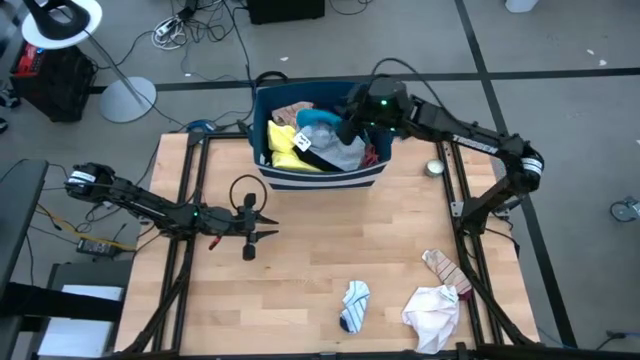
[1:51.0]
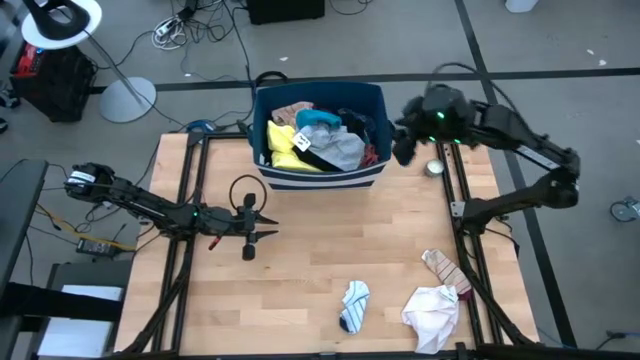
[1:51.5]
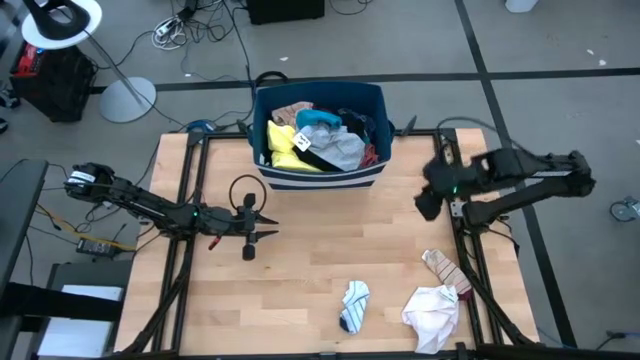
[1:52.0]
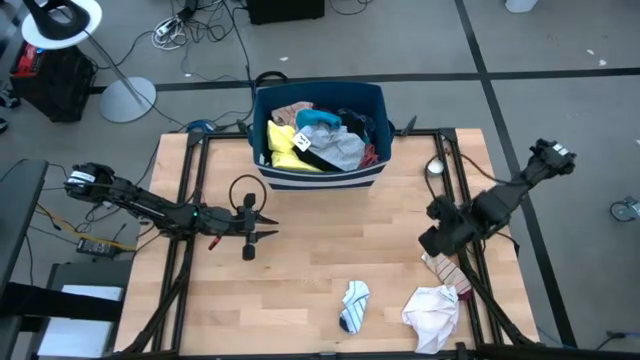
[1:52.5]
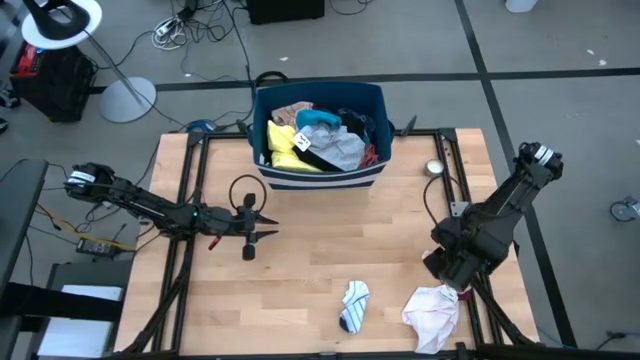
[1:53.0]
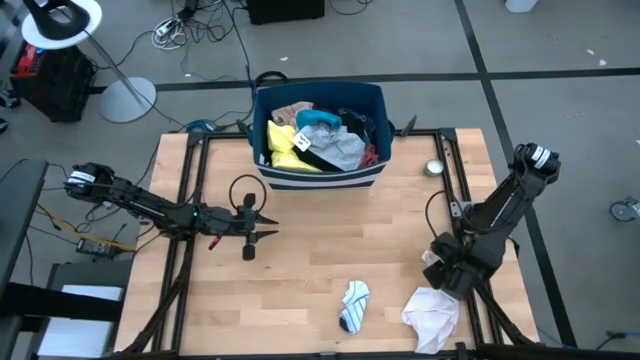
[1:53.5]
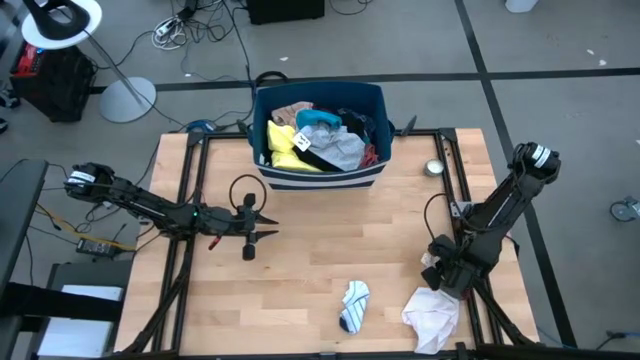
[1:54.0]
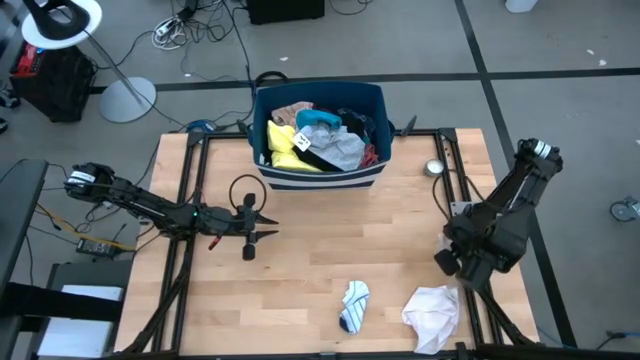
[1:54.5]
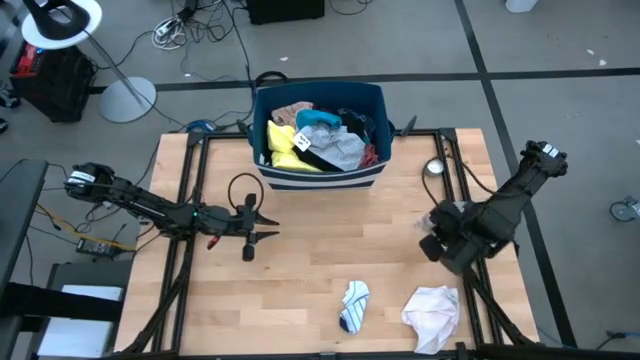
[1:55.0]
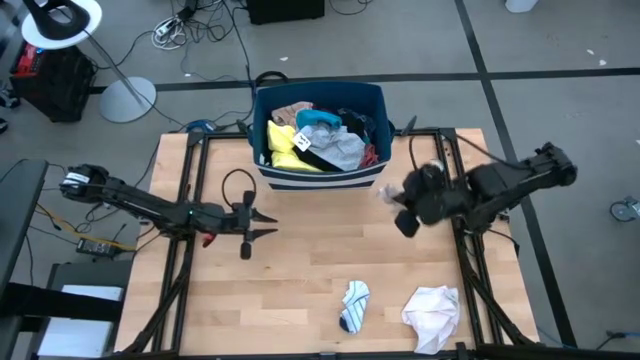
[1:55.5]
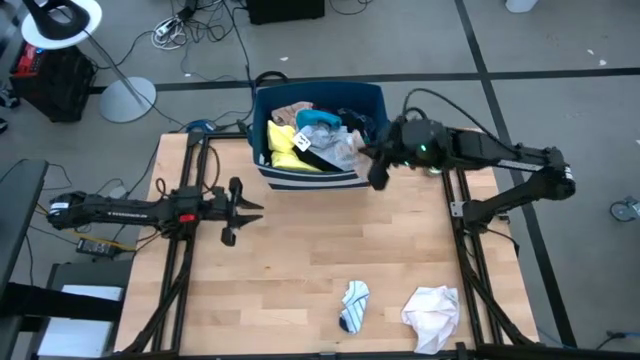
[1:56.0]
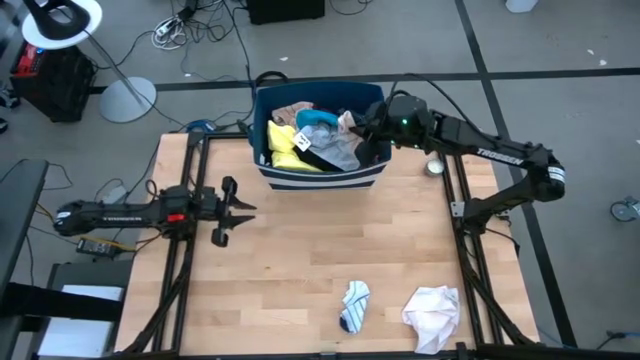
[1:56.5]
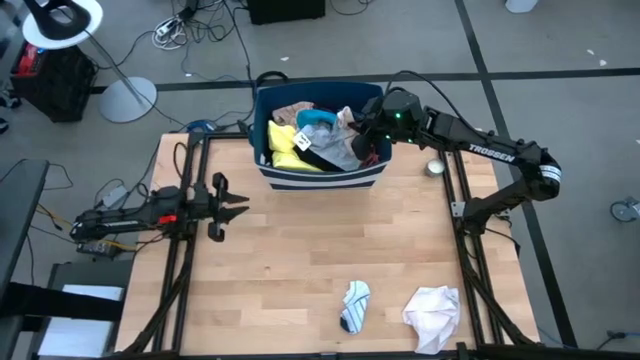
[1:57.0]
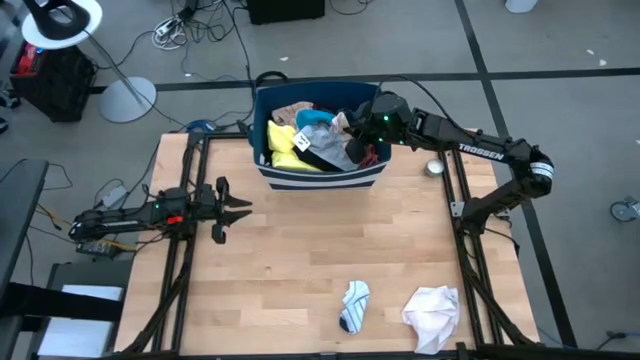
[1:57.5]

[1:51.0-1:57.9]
Task: Sort clothes
Put the light brown patterned sock into the blue laundry bin

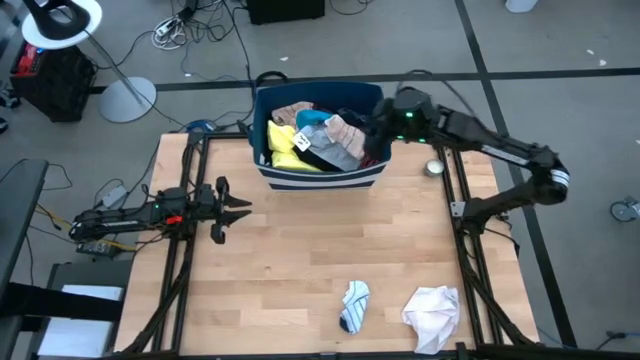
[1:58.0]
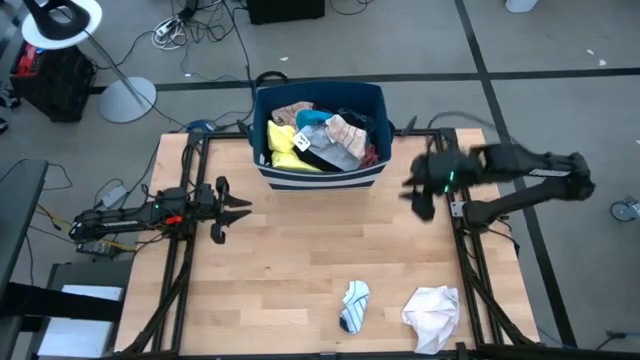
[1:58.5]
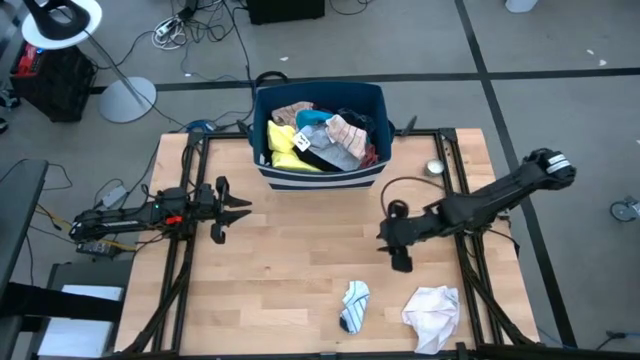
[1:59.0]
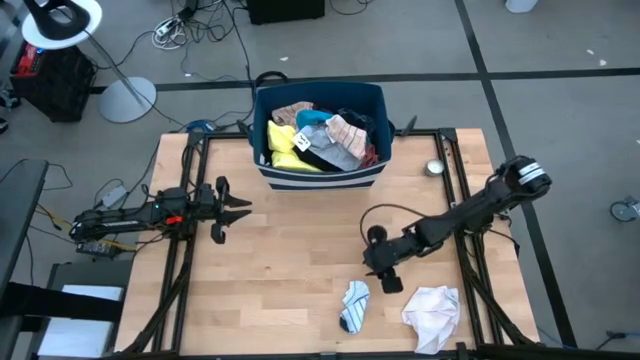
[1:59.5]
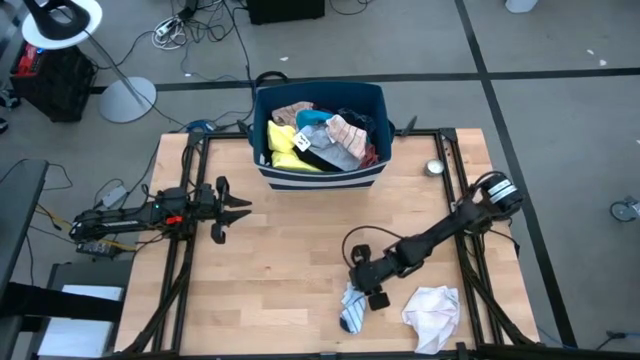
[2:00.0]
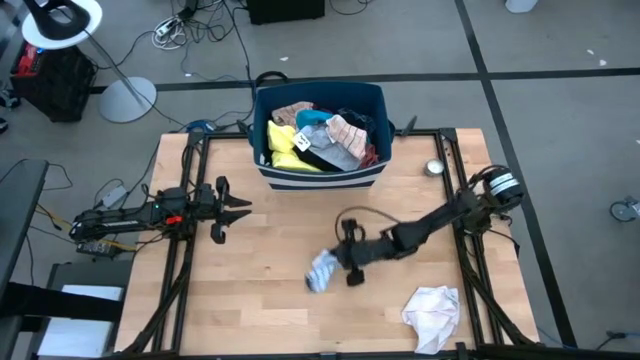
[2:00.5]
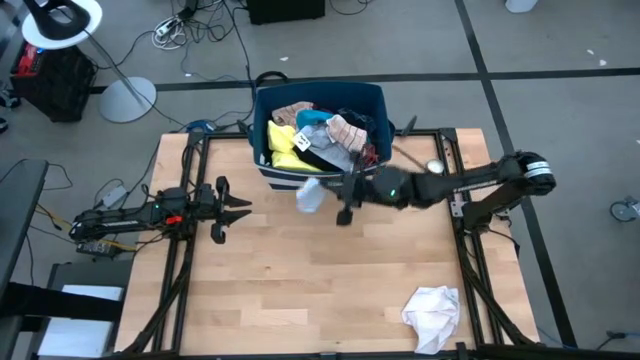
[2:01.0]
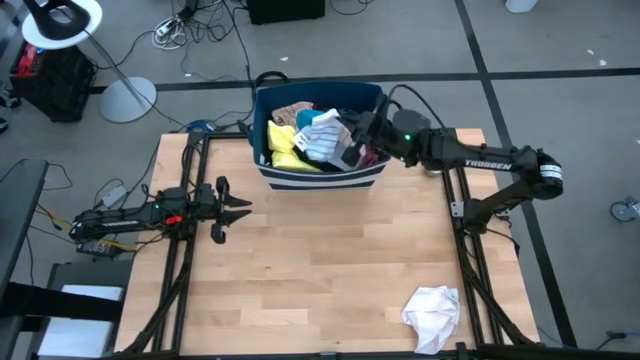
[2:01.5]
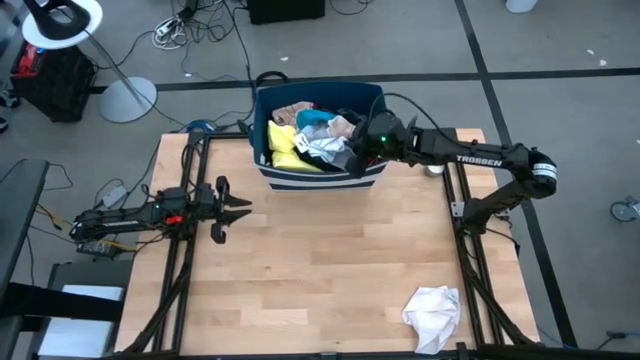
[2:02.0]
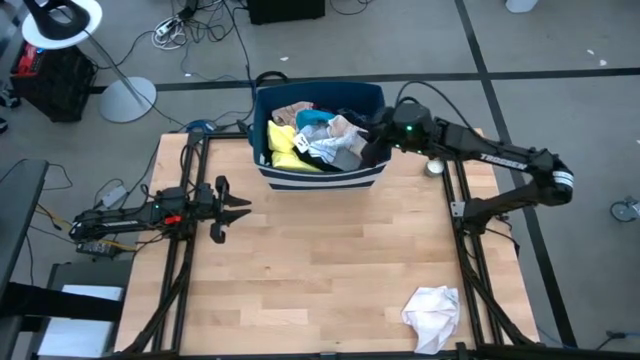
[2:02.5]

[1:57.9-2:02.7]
Put the white patterned sock into the blue laundry bin

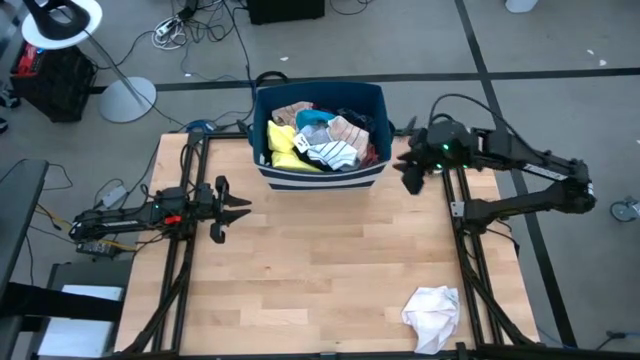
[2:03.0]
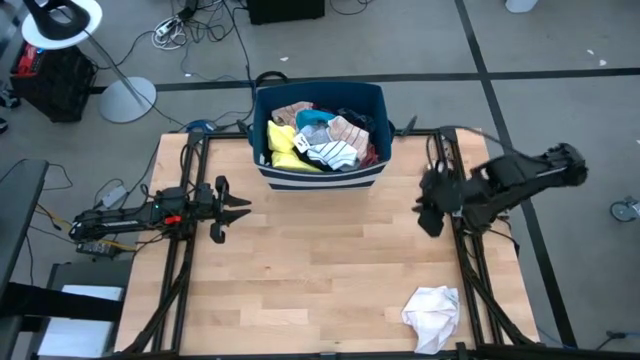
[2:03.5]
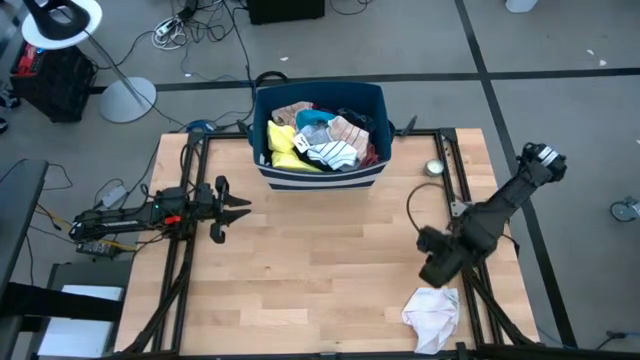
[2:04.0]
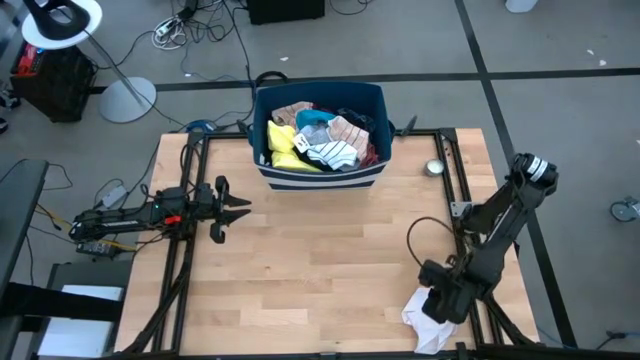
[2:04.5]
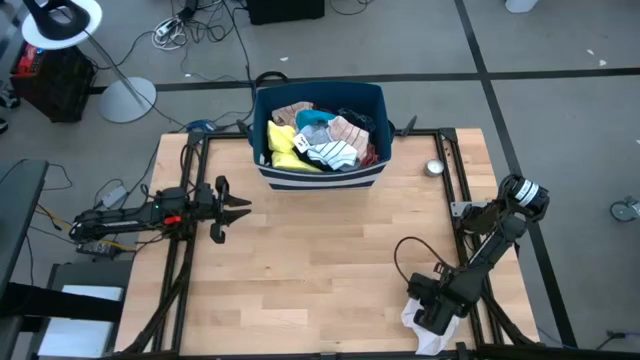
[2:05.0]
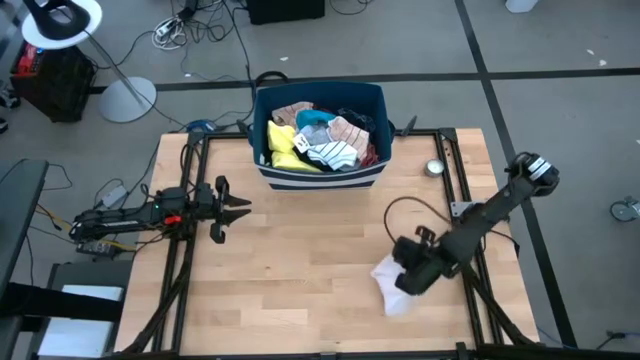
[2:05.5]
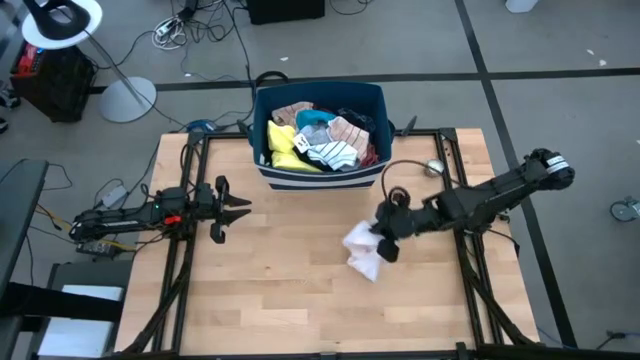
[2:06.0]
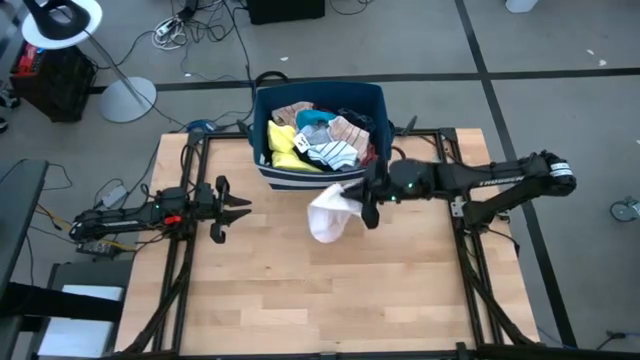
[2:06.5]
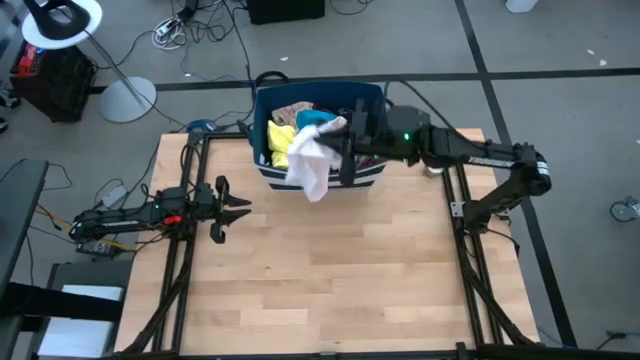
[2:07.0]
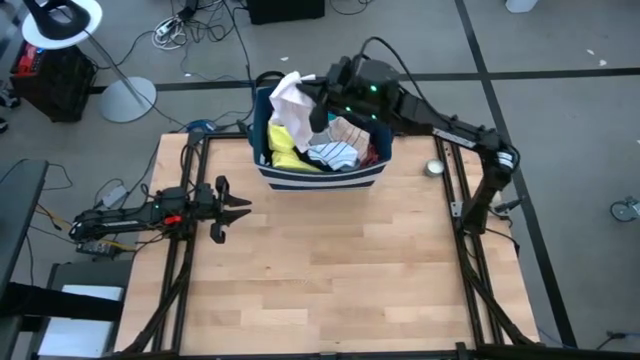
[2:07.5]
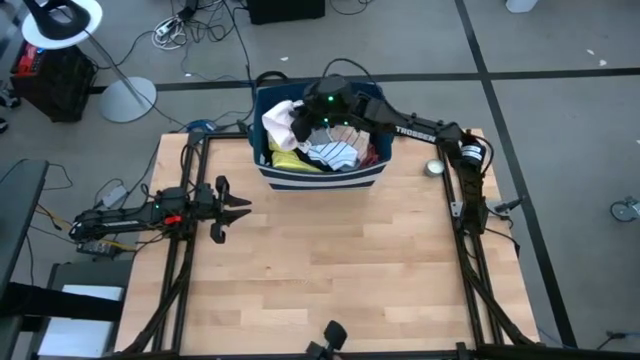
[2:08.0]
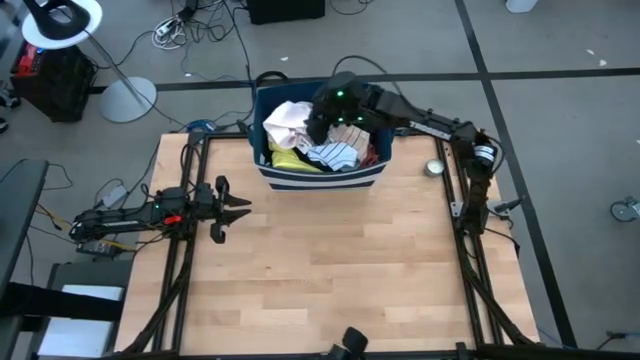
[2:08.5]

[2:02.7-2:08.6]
Put the white underwear into the blue laundry bin

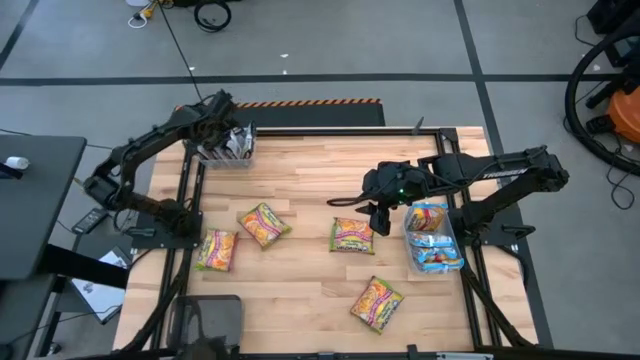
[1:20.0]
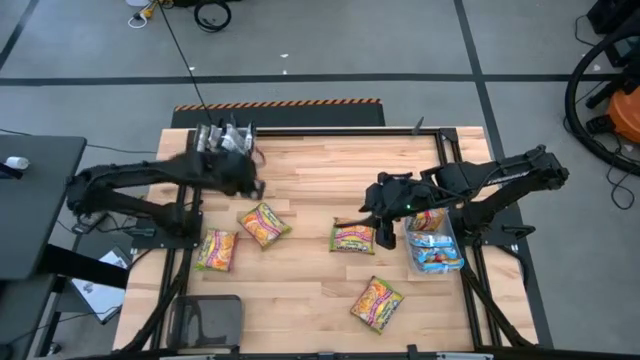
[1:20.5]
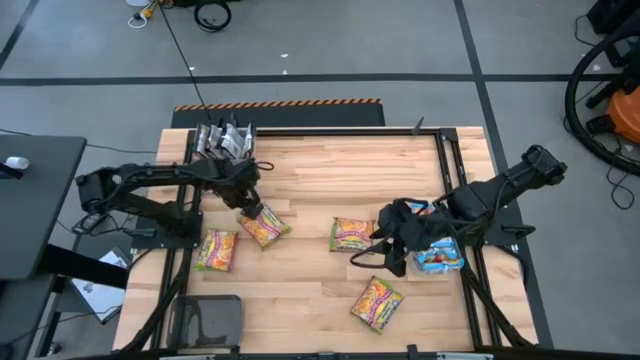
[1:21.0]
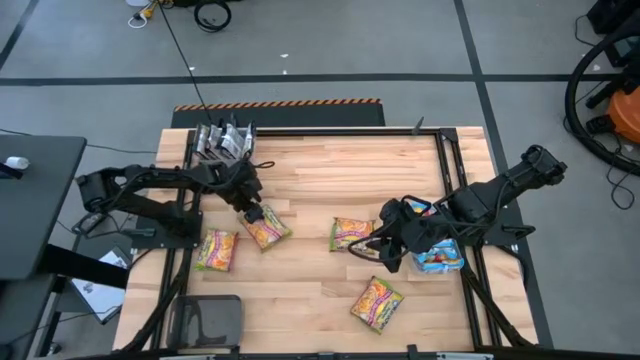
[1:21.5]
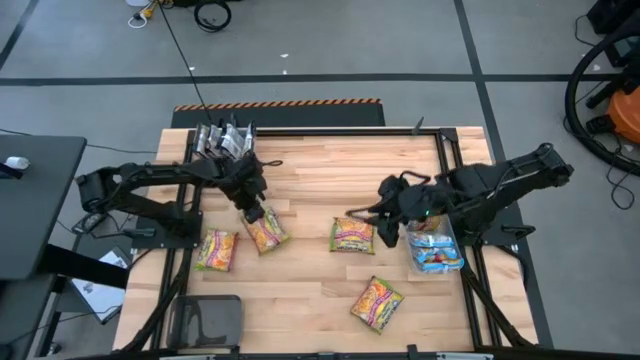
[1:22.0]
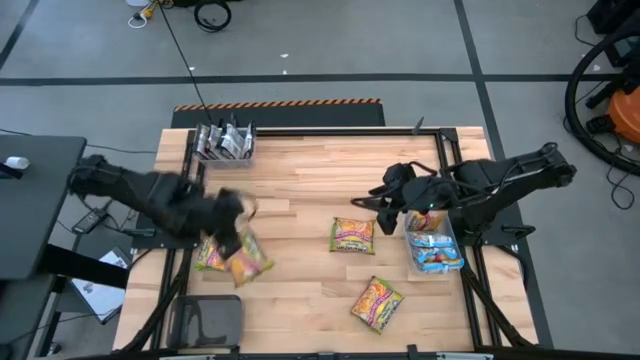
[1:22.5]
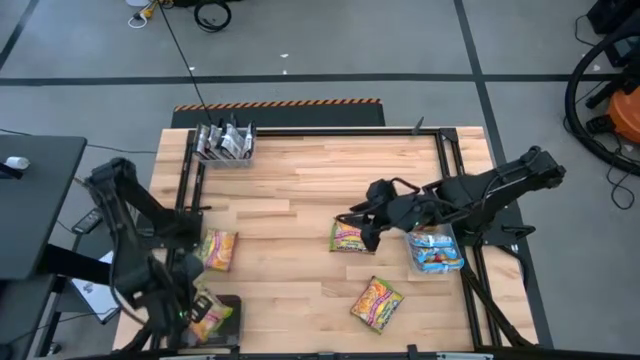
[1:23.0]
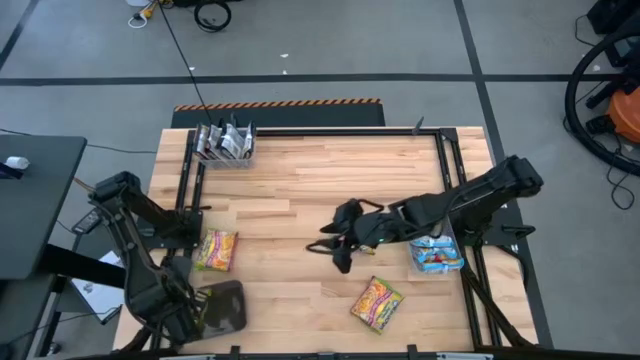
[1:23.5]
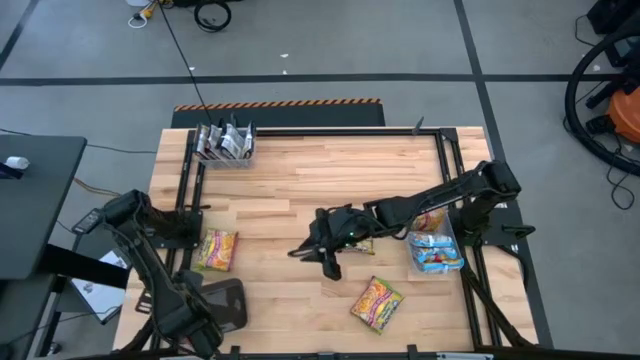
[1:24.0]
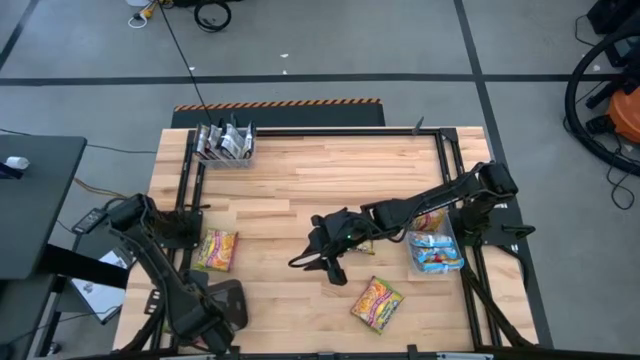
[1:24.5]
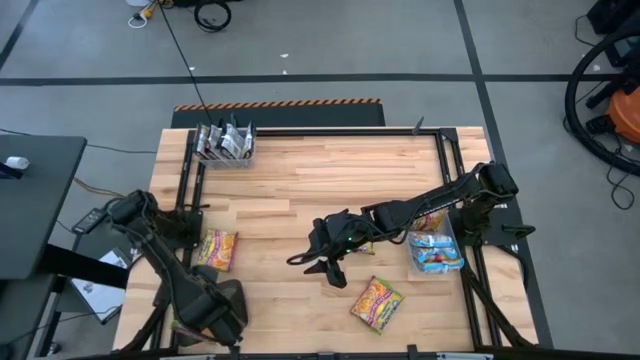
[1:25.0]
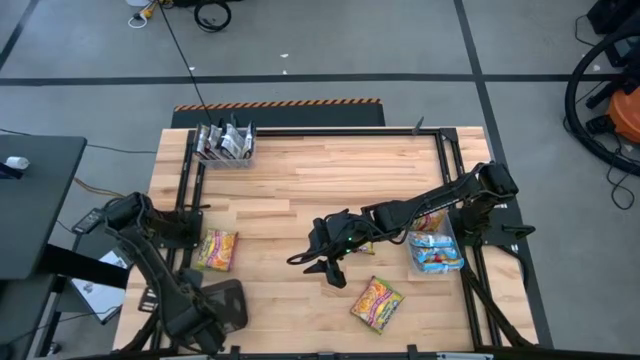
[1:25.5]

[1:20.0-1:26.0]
Task: Sort Maruchan noodles
Put the green noodle pack into the black bin
